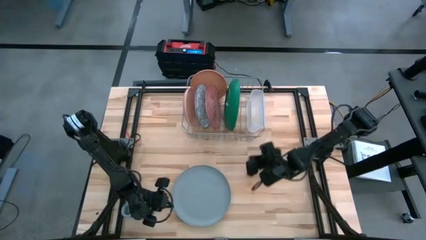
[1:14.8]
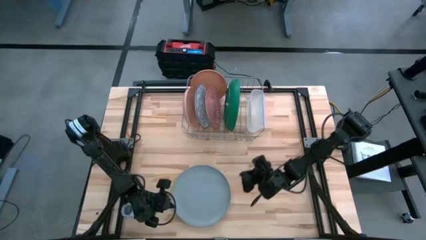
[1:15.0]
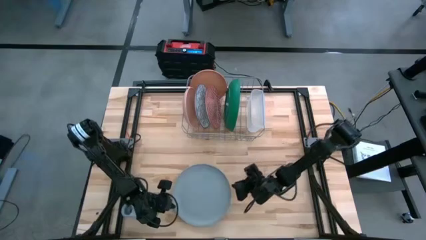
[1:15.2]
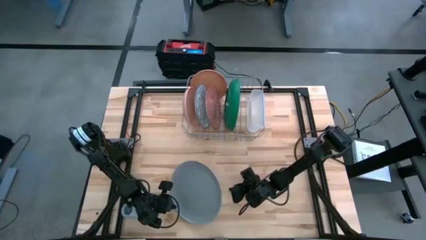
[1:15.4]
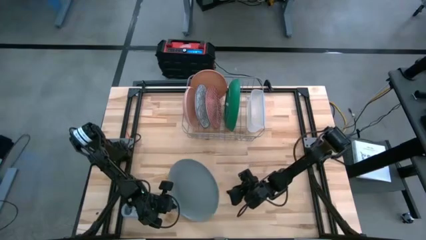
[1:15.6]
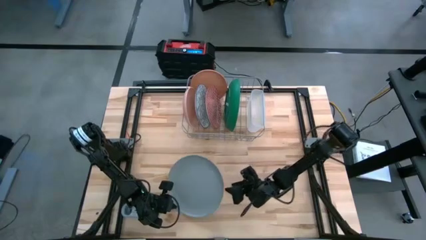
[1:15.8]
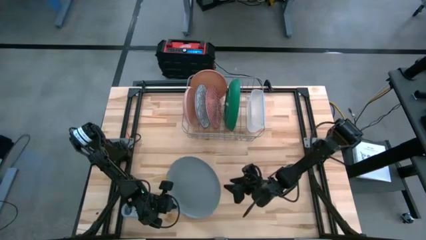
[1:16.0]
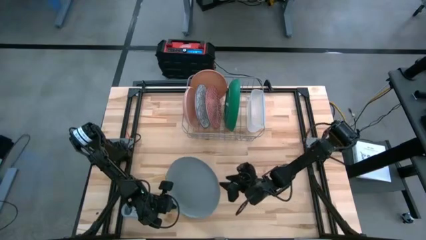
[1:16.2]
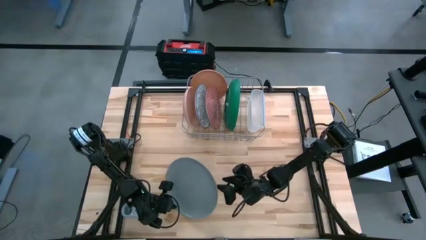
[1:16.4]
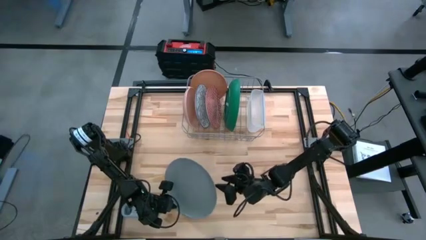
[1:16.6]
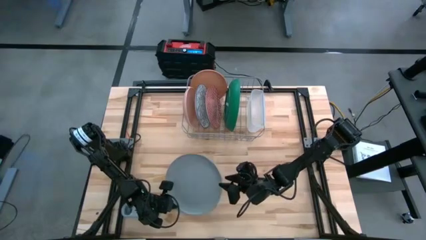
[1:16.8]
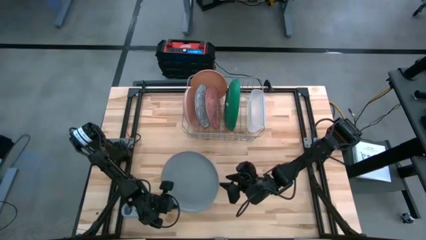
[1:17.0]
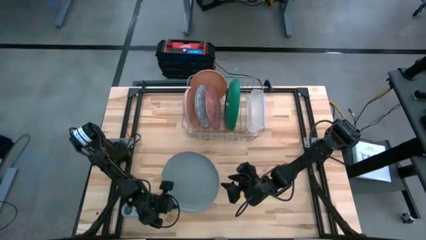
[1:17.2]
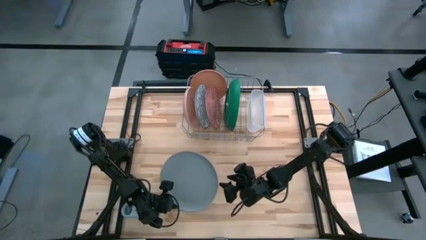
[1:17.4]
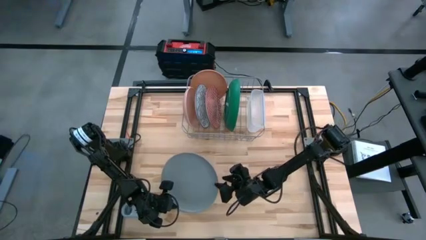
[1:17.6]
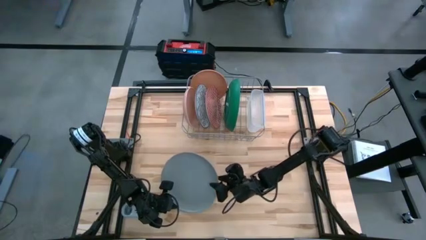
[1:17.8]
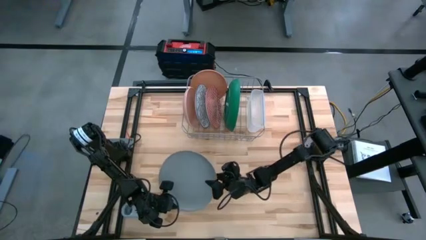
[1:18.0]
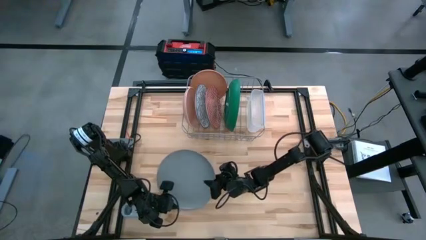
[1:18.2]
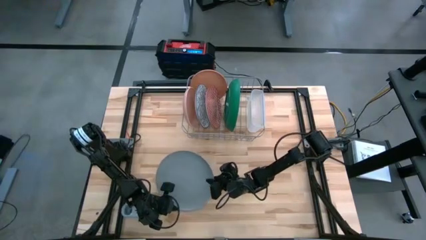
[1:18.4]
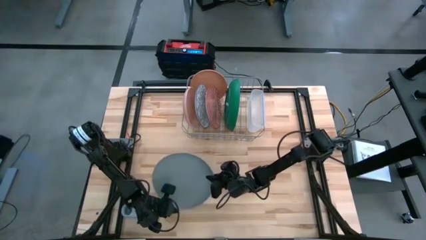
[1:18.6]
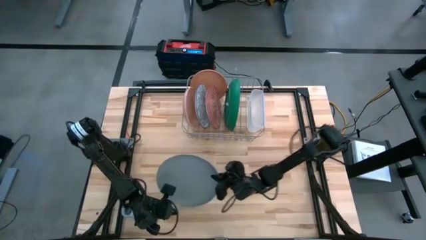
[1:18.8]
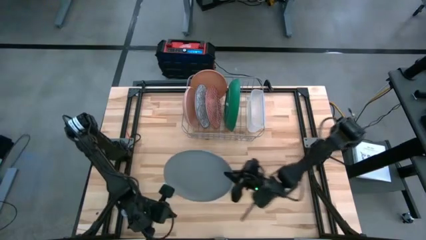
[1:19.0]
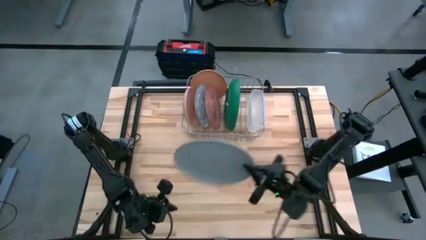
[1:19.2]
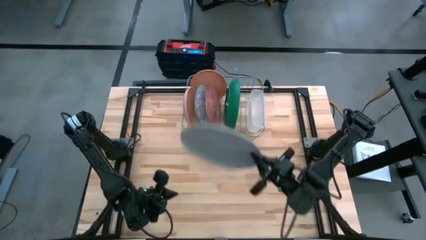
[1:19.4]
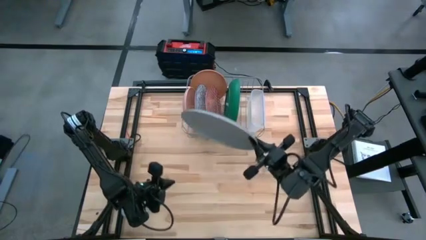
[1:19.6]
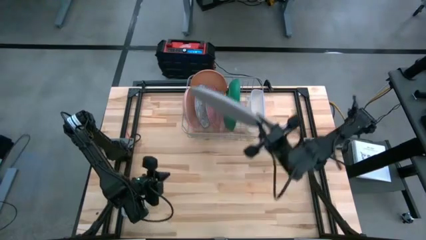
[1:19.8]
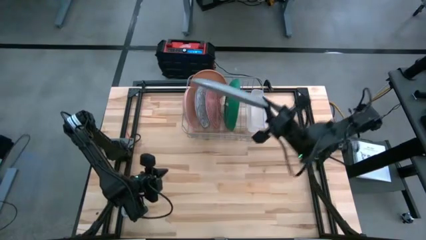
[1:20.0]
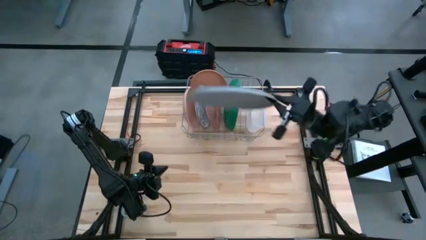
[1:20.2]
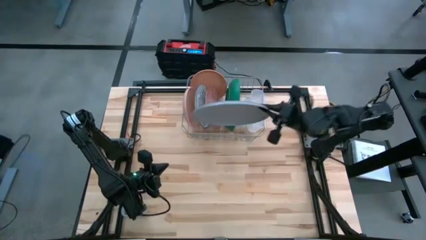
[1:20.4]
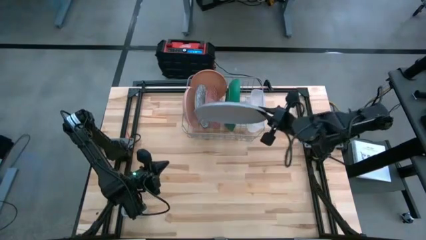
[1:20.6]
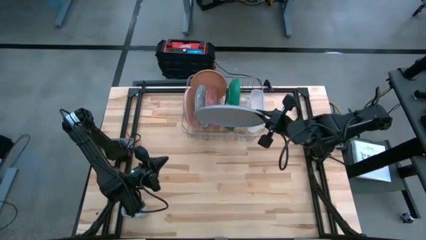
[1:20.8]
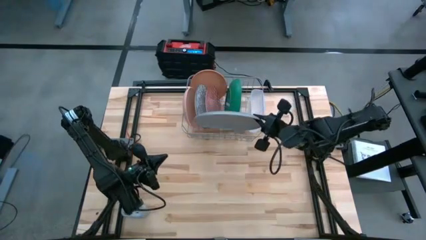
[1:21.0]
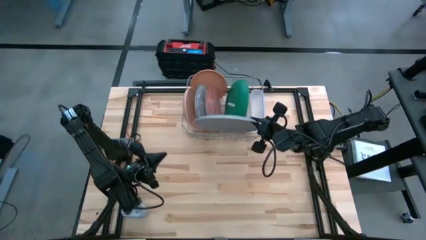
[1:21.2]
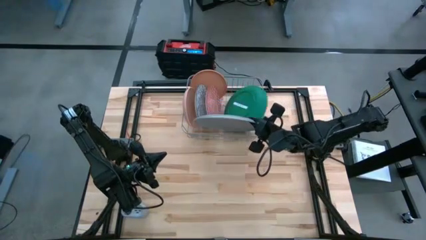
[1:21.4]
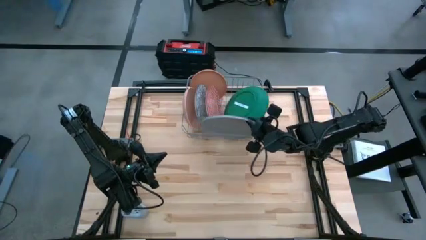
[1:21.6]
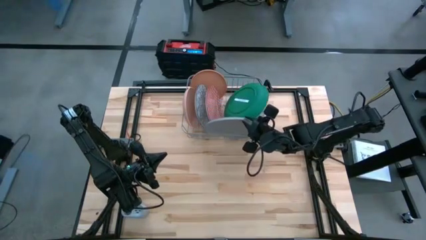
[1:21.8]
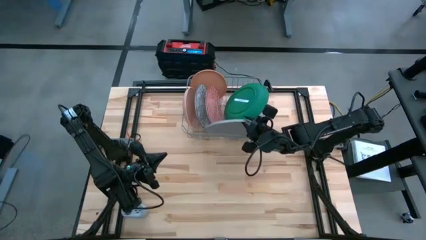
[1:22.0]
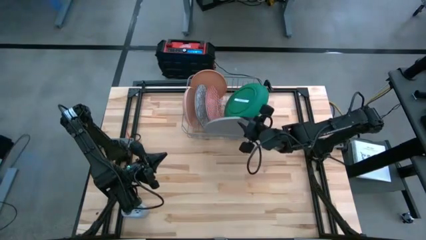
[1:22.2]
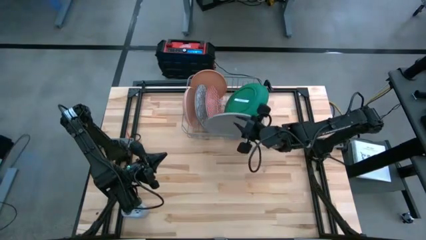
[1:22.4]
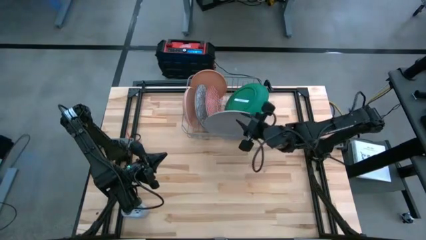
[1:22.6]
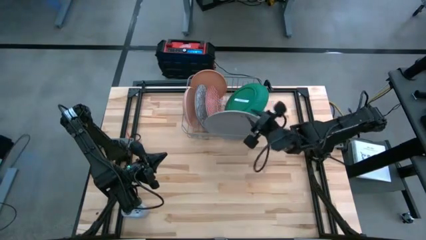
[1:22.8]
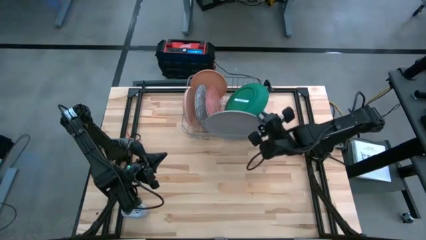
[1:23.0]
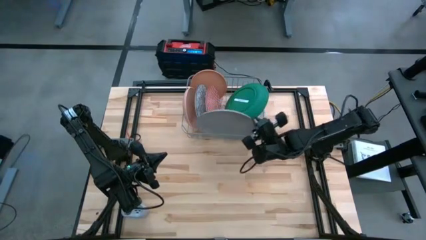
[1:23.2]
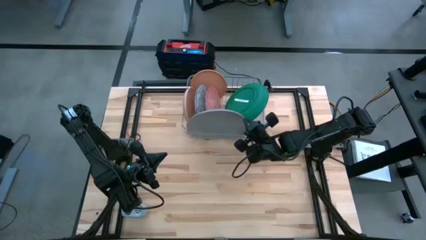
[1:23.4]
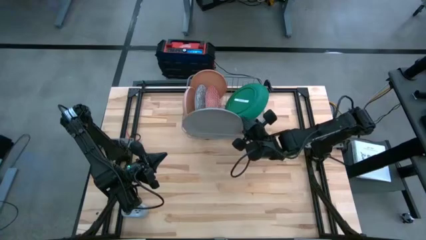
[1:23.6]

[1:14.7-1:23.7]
Task: Sort dishes
Put the gray plate in the dish rack

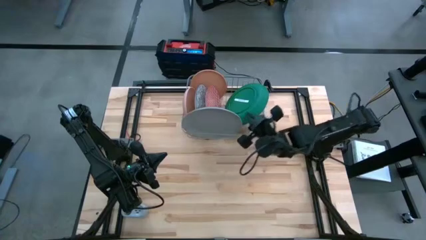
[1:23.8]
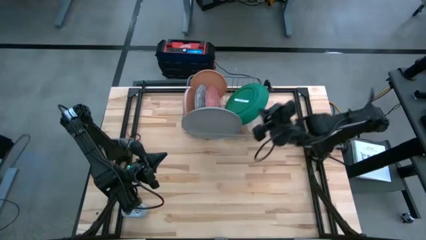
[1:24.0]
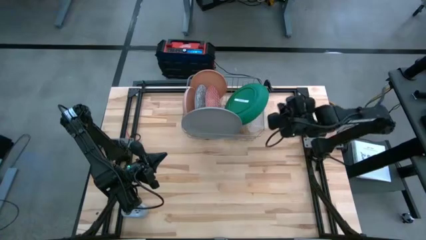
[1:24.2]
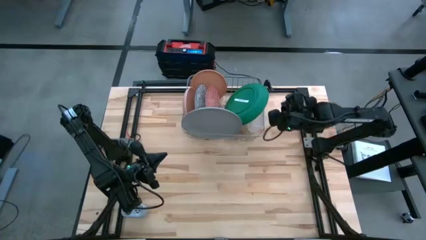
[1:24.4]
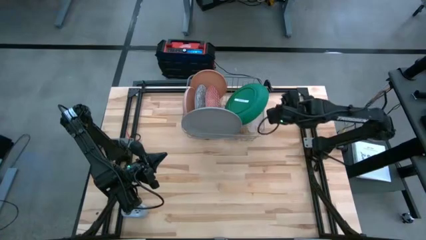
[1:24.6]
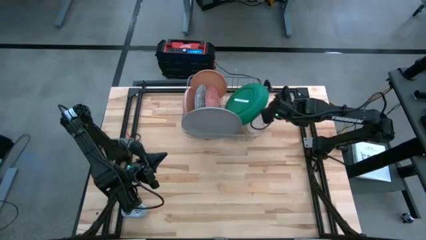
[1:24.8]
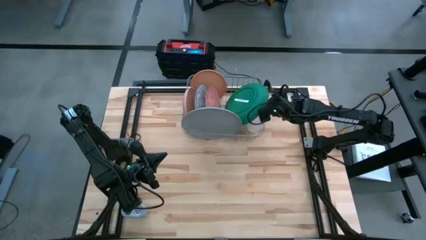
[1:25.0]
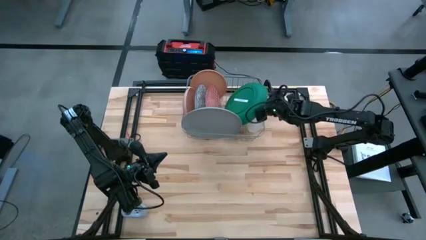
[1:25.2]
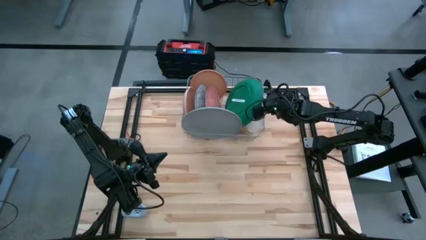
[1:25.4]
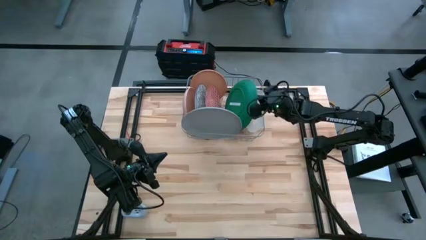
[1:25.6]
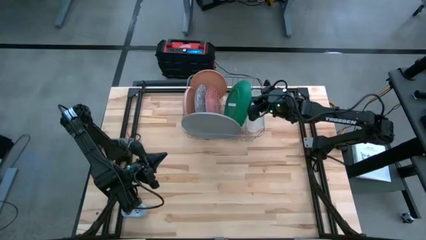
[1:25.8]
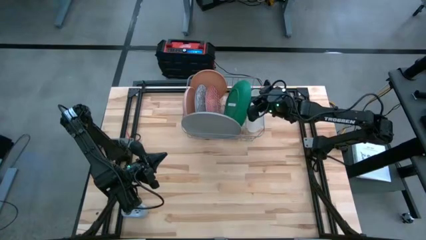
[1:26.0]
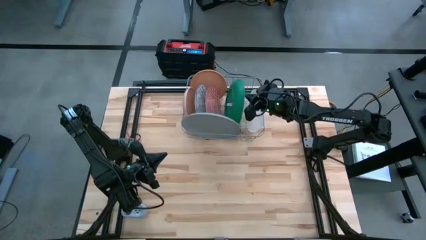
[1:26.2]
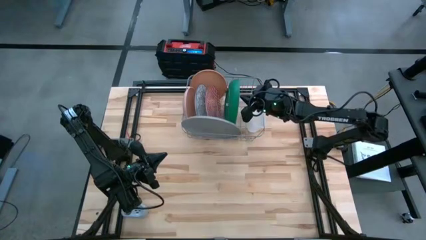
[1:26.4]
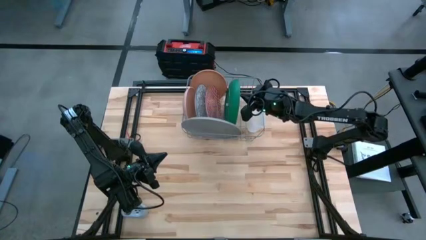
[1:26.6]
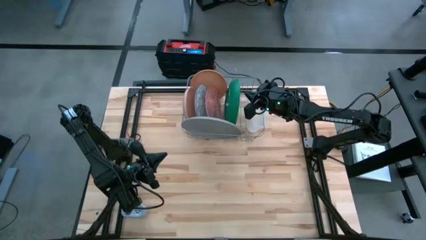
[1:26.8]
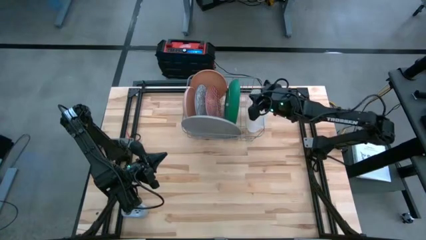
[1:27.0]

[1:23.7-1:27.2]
Adjust the green plate in the dish rack

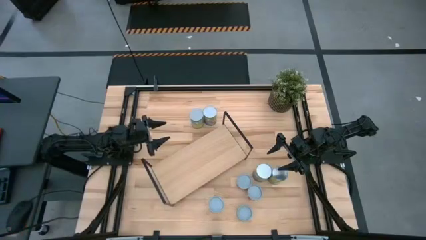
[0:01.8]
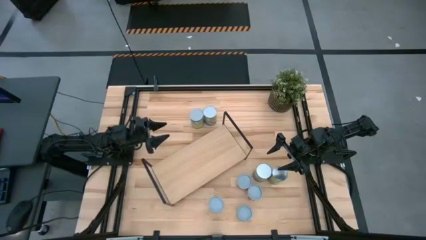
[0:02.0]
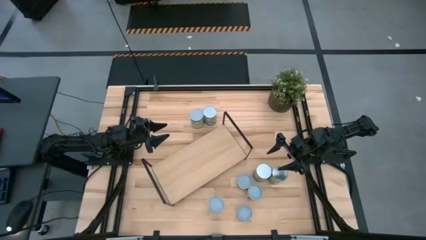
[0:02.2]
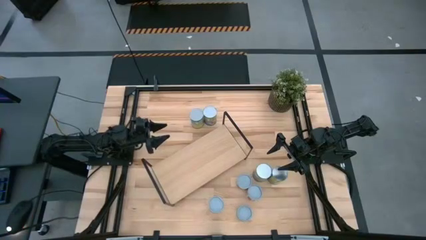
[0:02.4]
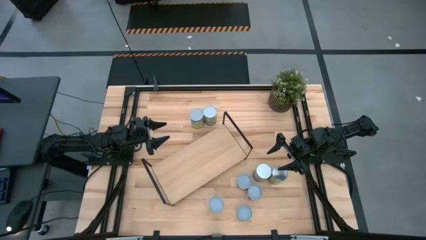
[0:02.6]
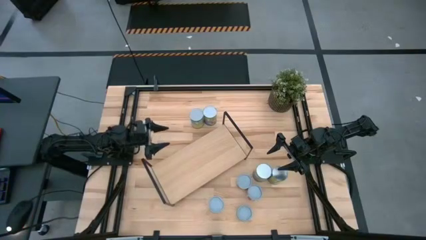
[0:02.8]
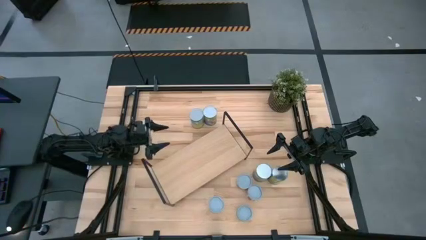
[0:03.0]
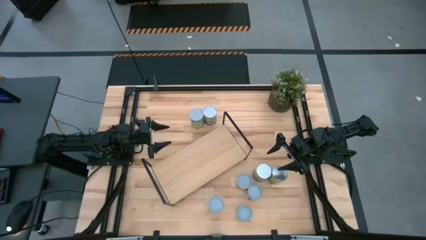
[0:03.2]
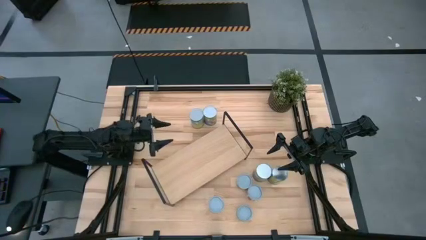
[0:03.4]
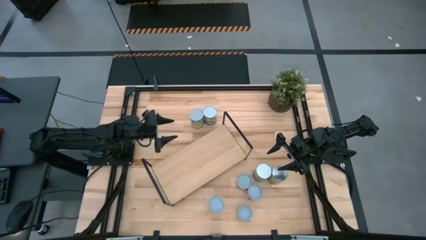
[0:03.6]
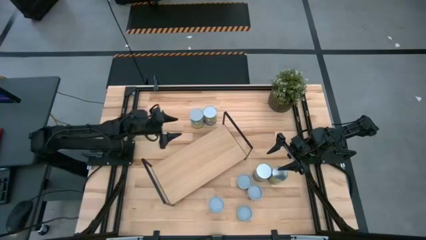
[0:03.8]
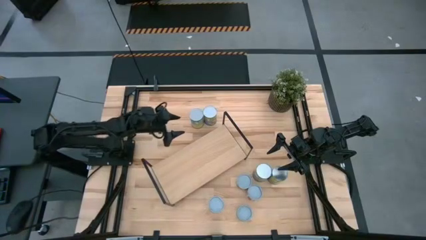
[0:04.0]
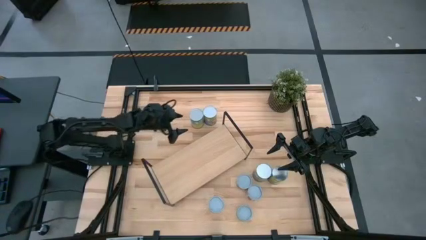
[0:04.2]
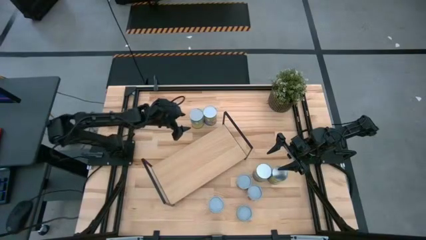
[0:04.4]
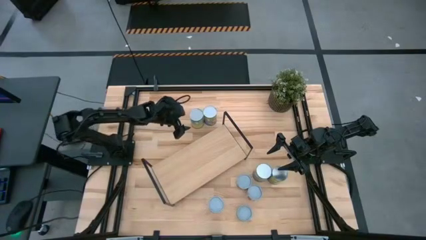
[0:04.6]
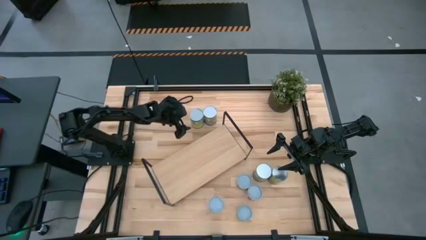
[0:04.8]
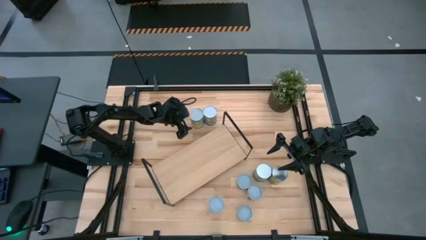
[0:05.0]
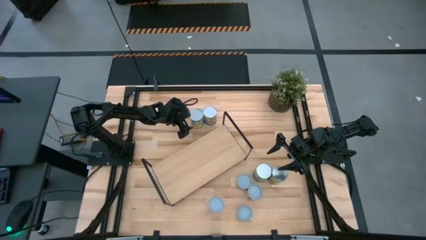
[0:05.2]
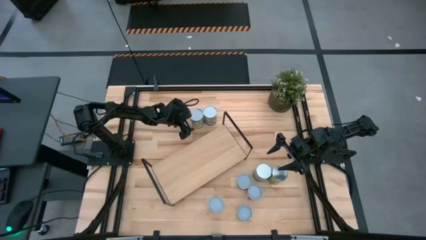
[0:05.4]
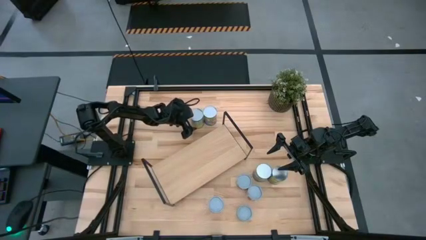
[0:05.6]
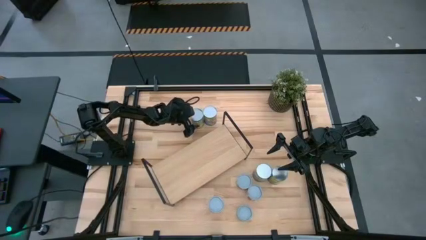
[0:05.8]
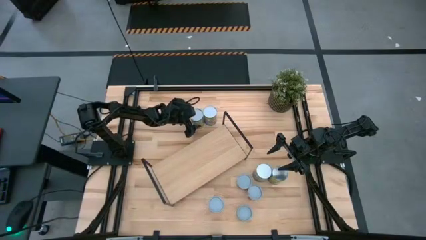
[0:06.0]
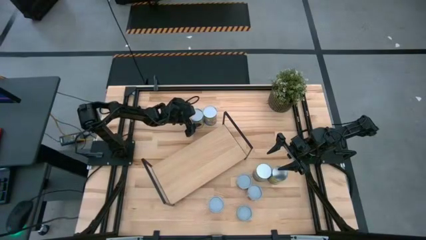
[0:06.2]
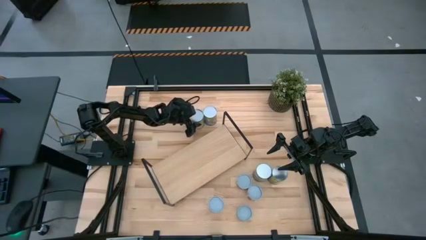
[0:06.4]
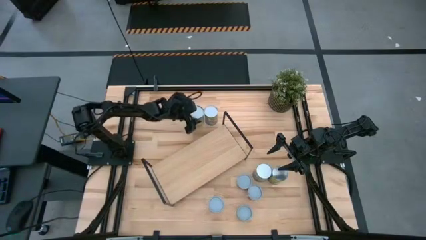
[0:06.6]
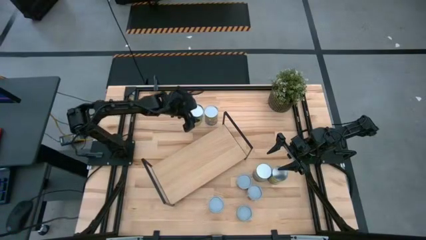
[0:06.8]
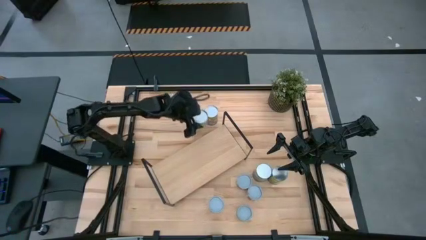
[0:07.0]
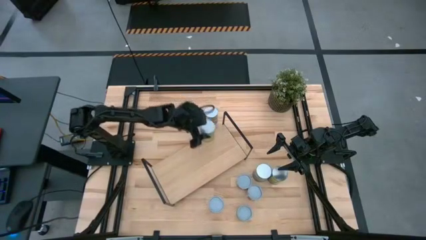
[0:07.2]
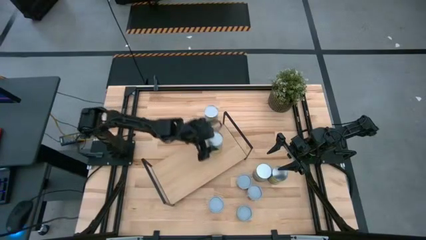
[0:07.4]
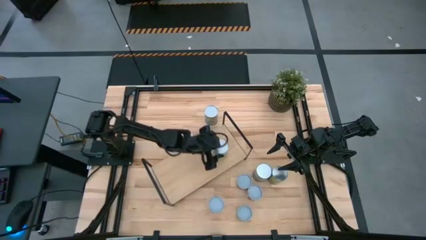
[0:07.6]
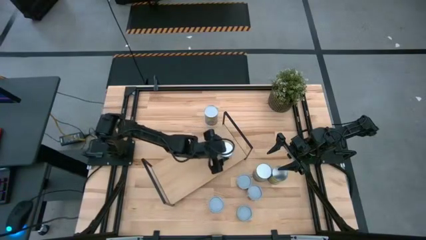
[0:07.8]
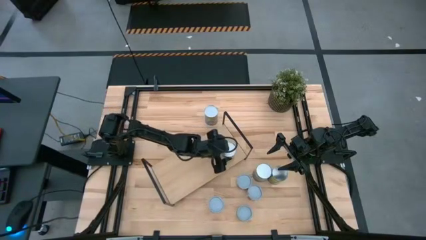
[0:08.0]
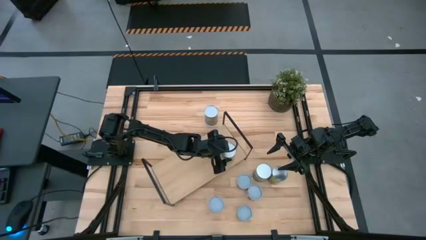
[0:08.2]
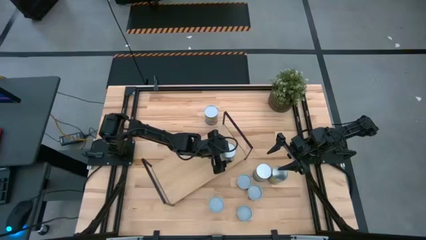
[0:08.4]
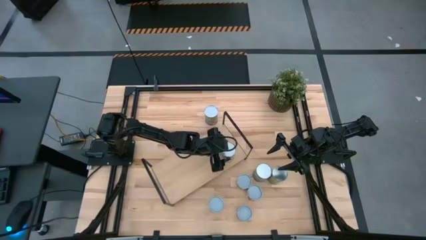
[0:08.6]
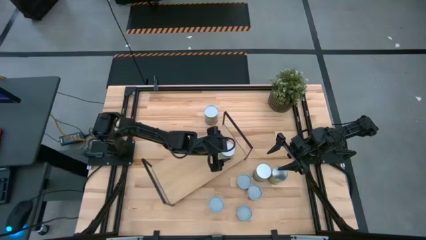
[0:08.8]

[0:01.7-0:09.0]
Task: Pick and place cans onto a shelf
Put the large canned carrots on the shelf
